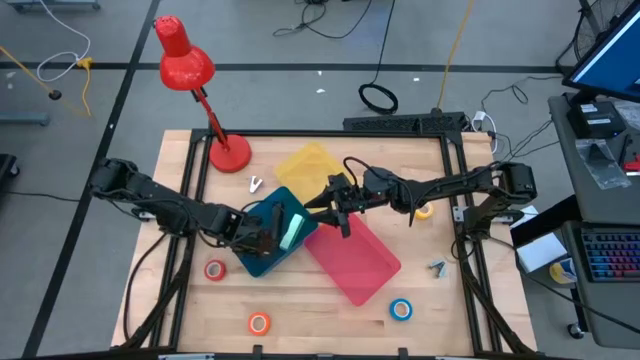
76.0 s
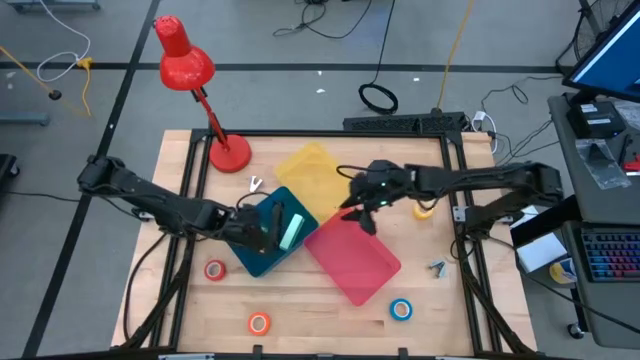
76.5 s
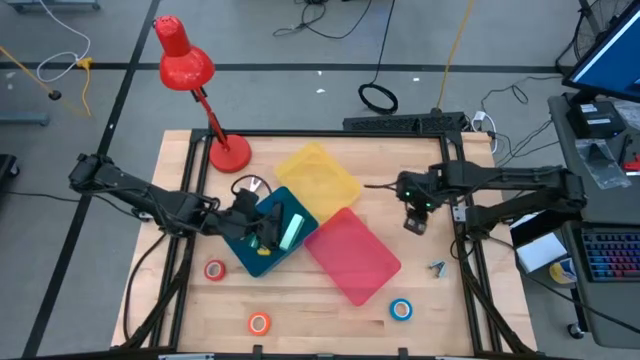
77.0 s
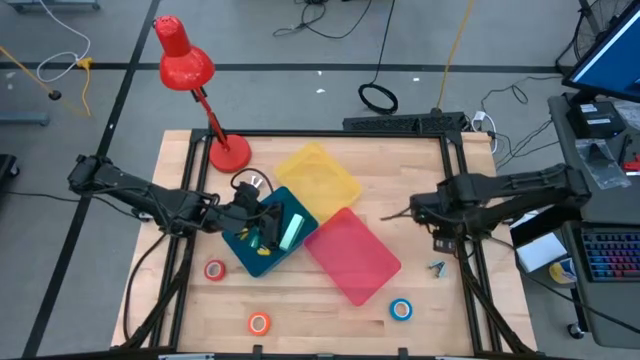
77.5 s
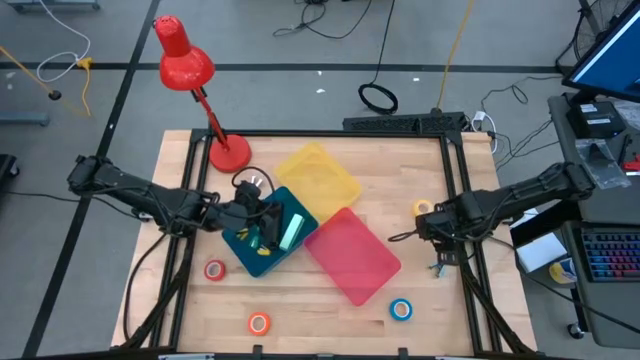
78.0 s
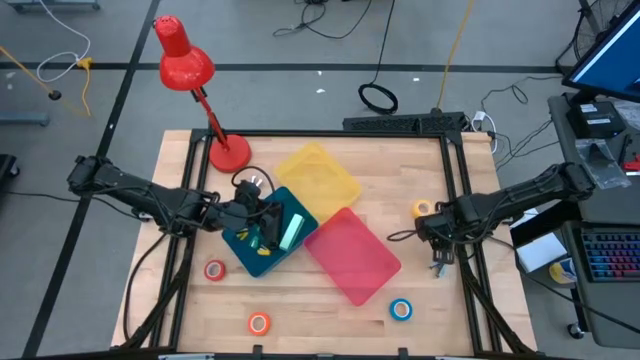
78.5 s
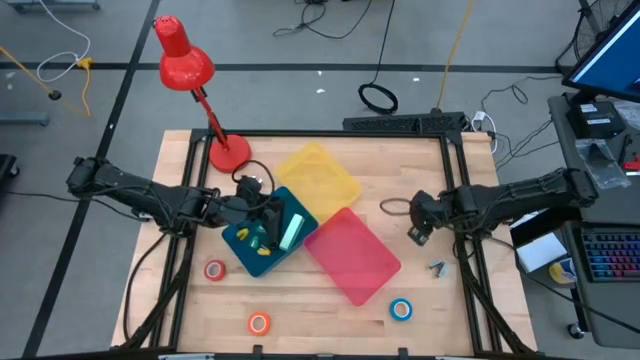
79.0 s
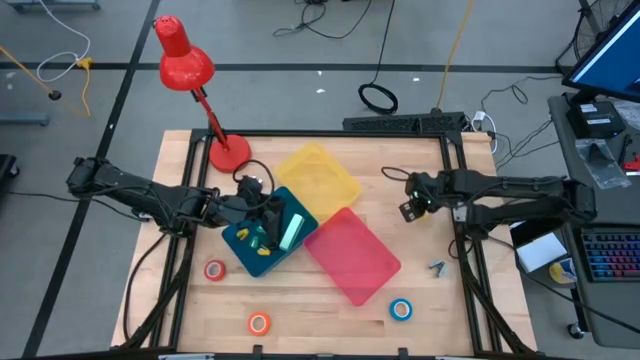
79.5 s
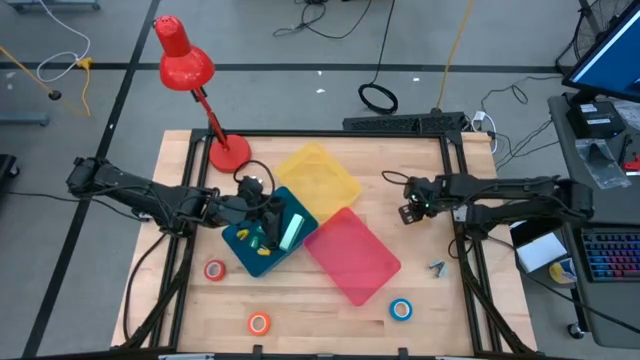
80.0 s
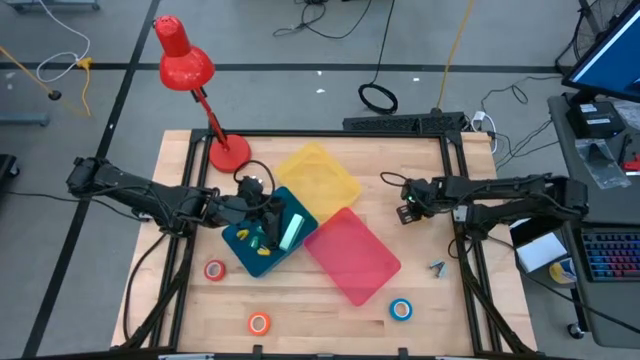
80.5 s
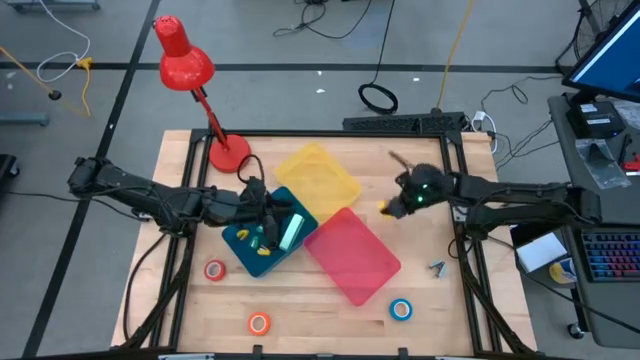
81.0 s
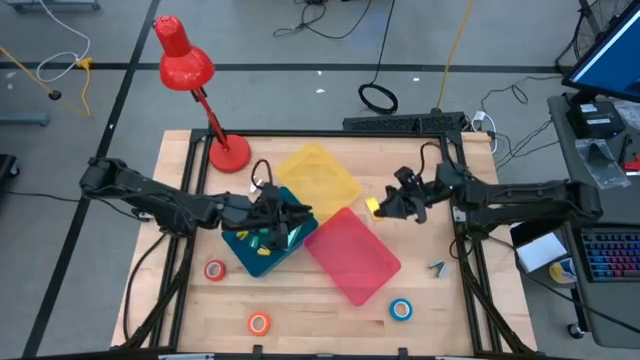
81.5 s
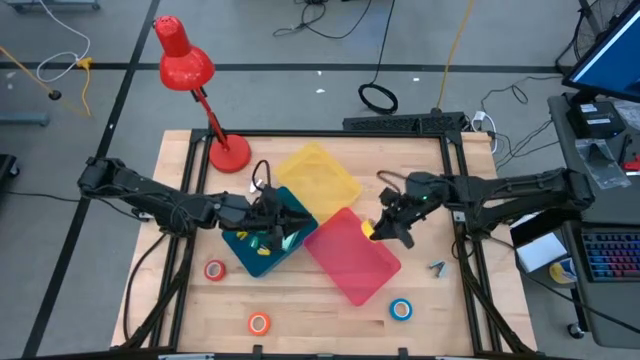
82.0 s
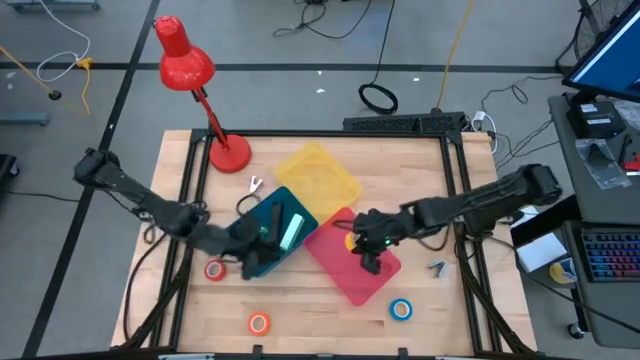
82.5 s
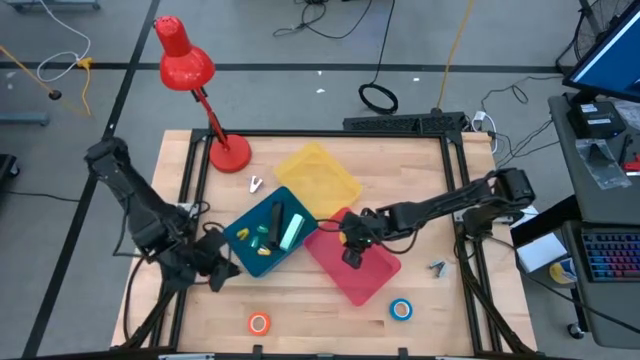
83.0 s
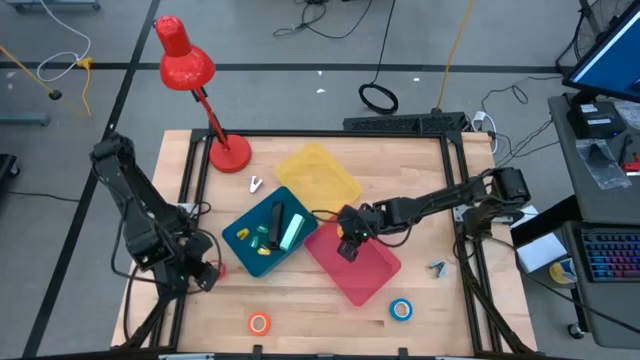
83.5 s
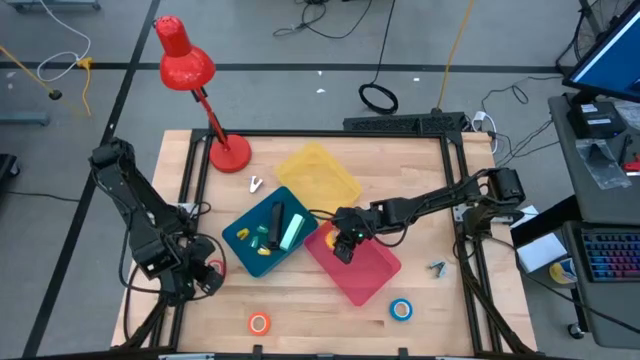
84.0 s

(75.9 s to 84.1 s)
Task: Pick and place Stapler, Stapler remover, tape
Put the yellow tape into the red bin

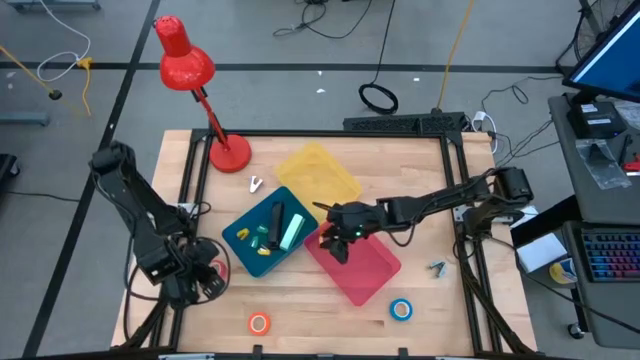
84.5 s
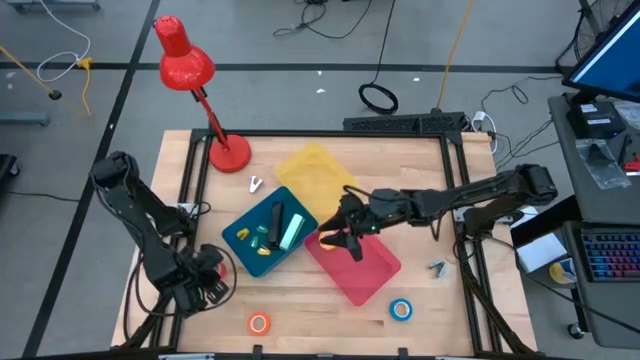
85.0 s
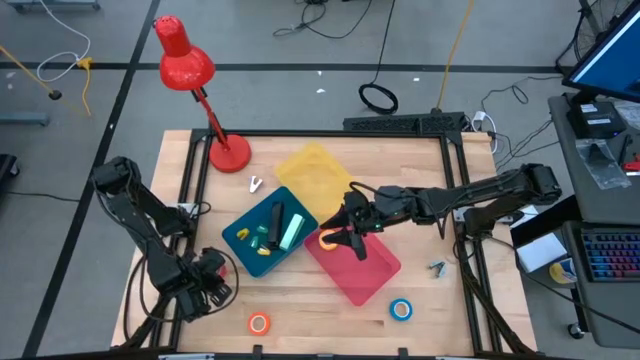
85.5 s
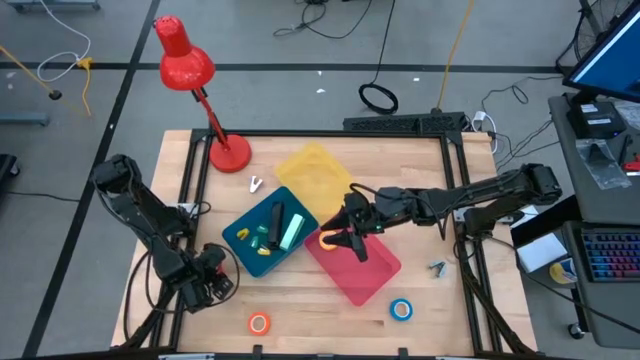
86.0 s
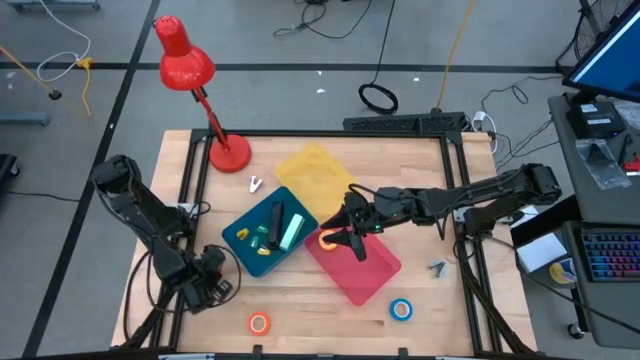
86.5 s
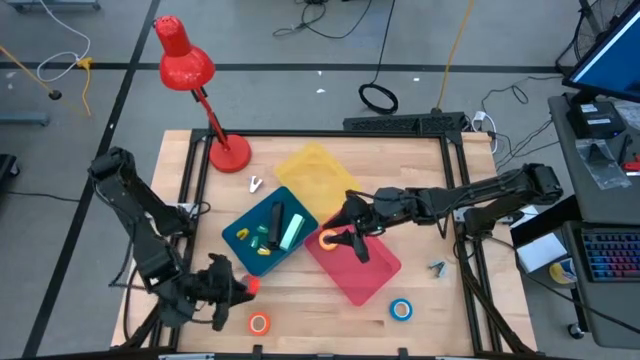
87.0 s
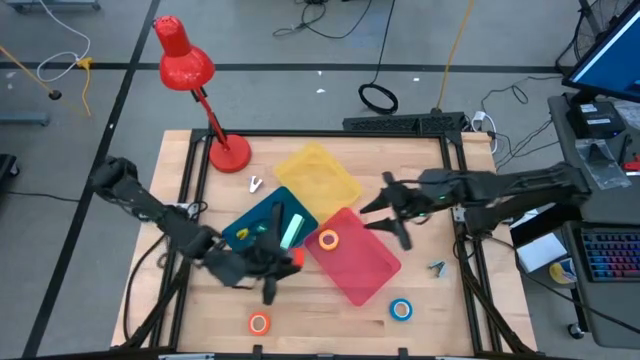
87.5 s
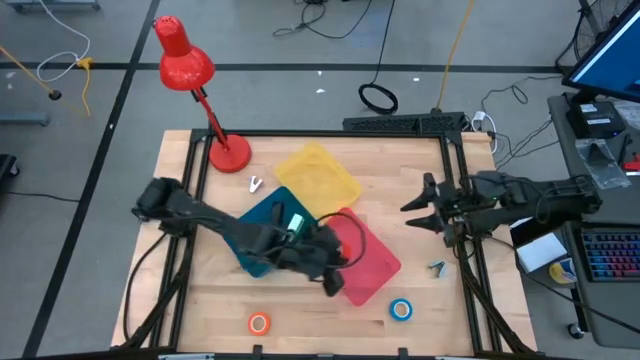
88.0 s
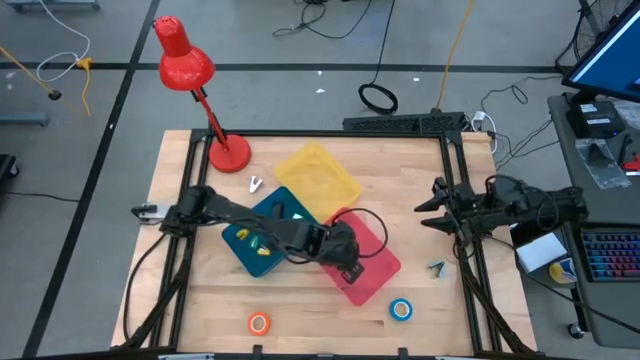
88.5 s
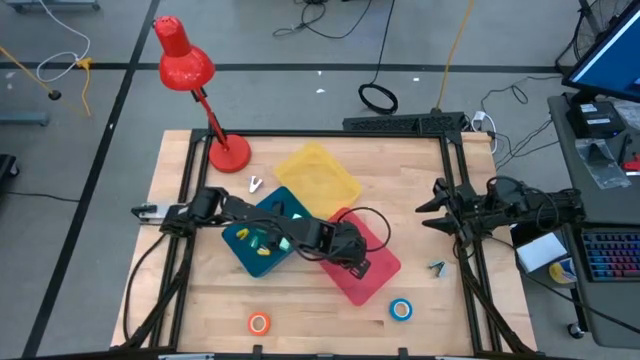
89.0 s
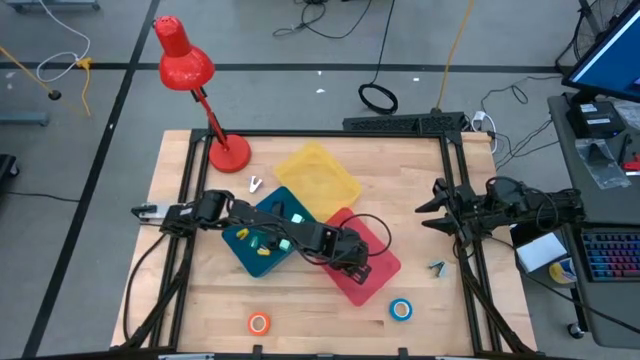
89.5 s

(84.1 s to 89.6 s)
Put the red tape into the red bin

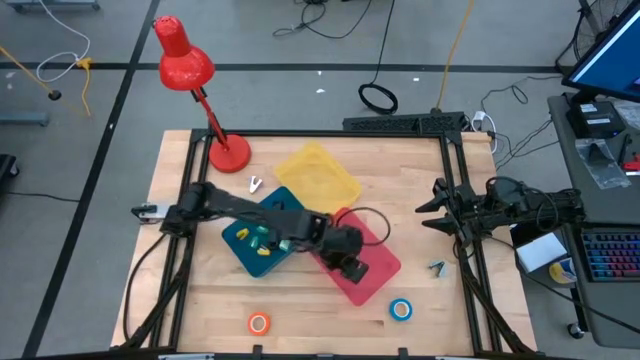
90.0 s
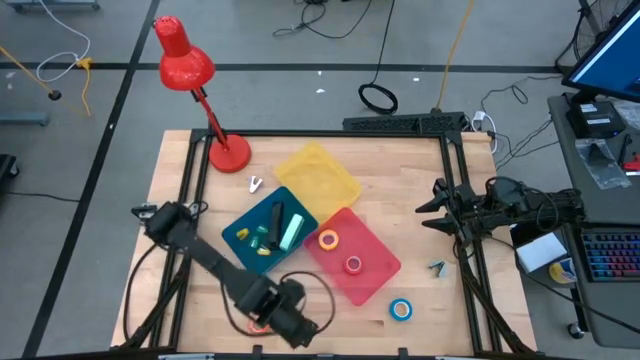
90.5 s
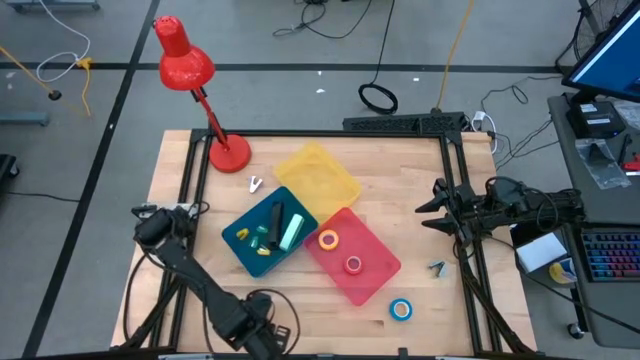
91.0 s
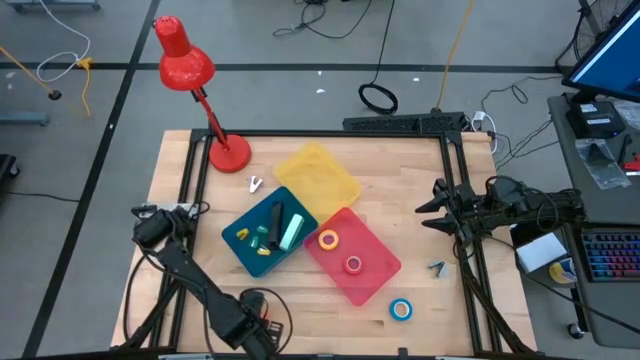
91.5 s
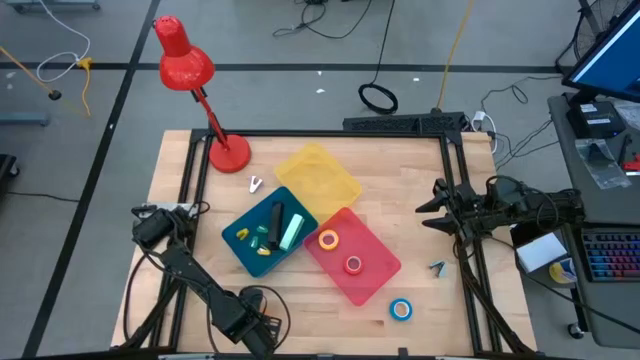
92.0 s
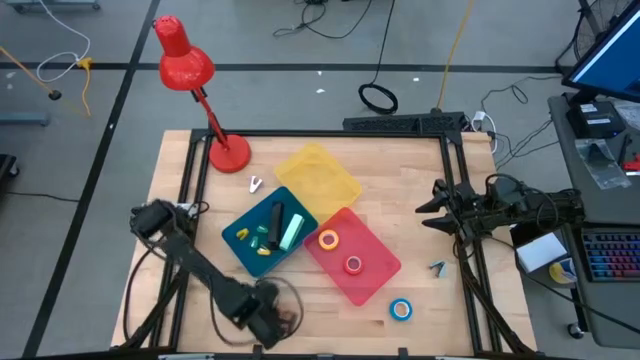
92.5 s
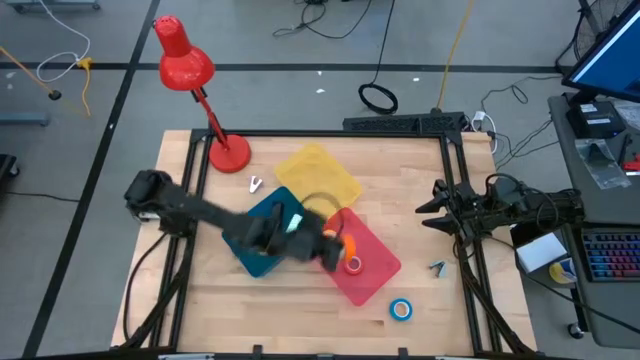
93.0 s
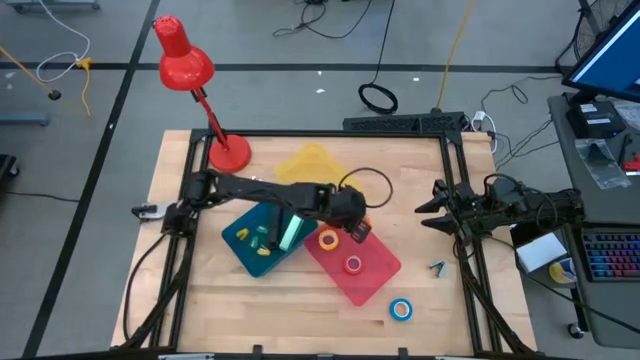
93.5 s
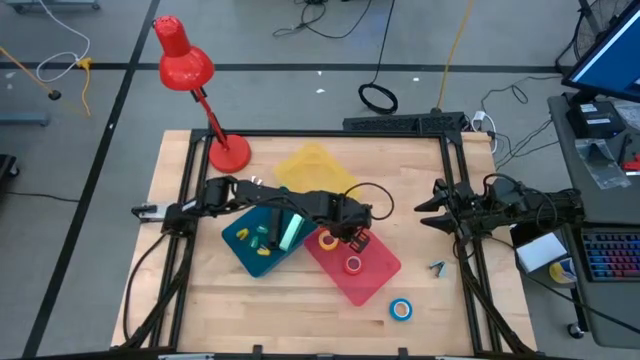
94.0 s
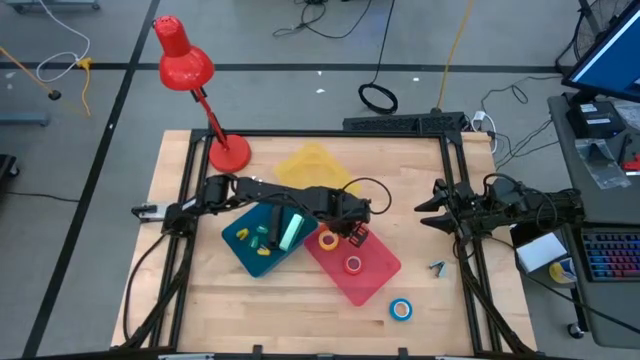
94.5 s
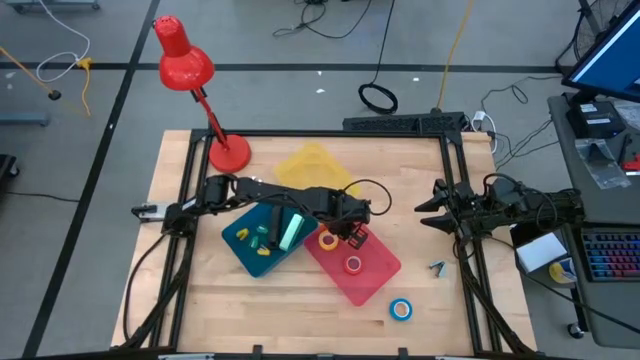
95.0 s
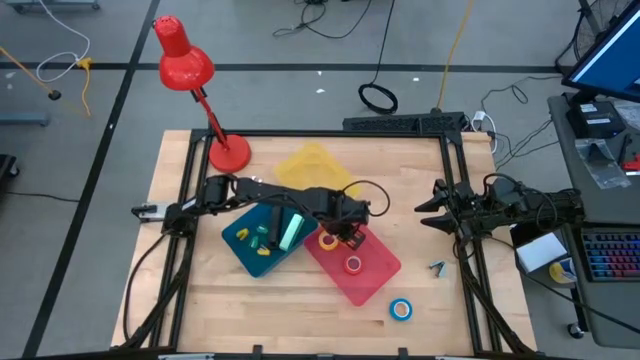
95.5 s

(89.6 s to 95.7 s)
Put the orange tape into the red bin

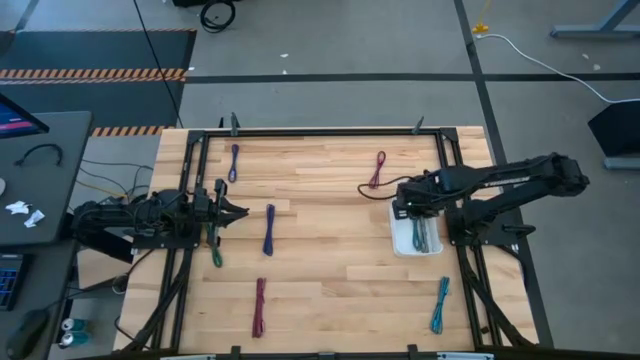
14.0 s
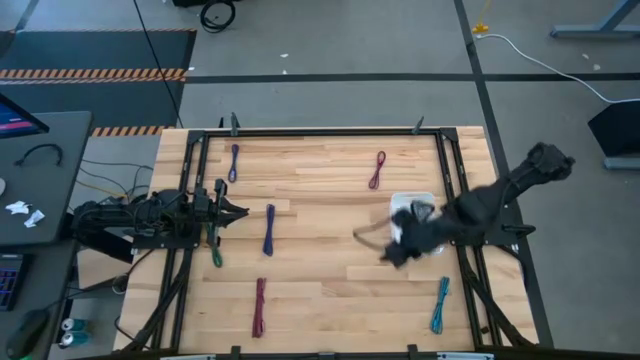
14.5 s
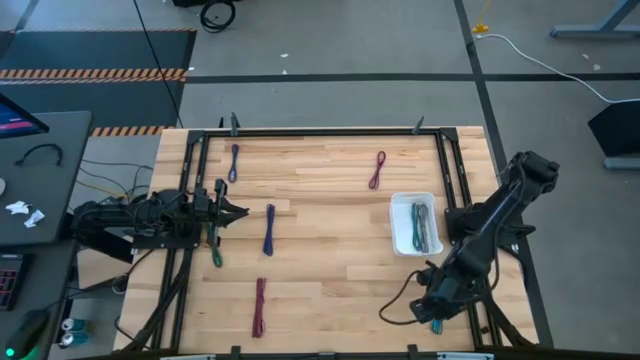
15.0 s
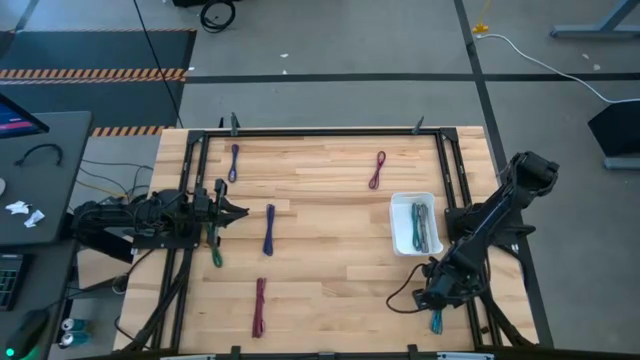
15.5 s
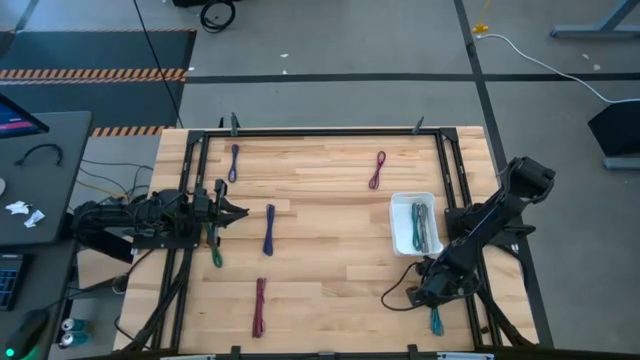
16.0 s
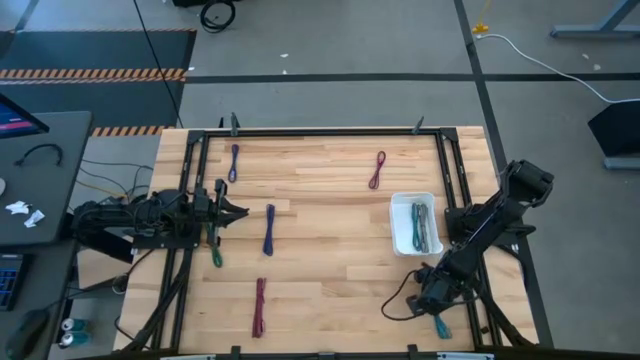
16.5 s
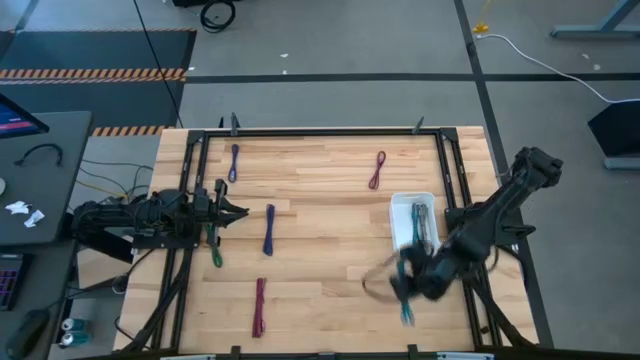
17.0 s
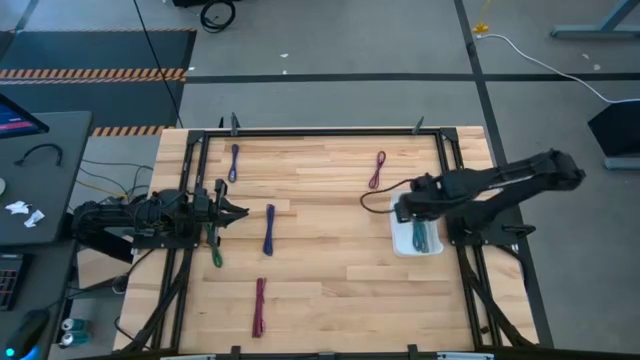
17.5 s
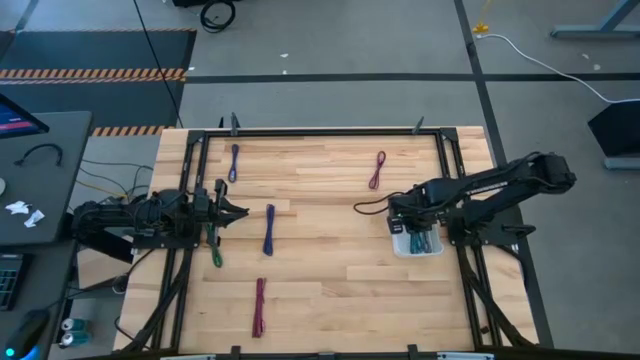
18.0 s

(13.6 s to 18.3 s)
Task: Pick and place USB-C Cables
Put the blue charging cable into the white bin
